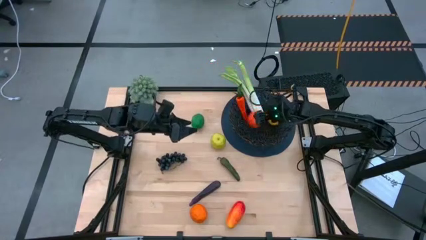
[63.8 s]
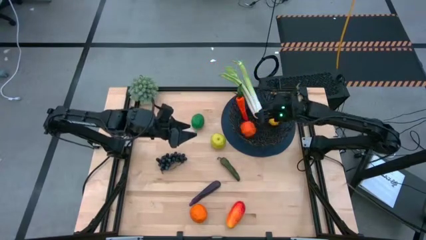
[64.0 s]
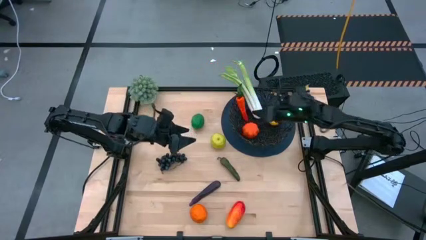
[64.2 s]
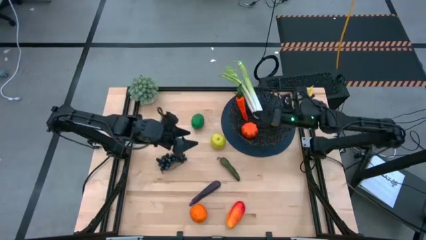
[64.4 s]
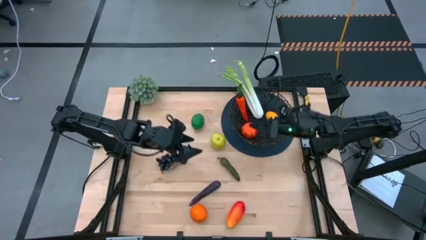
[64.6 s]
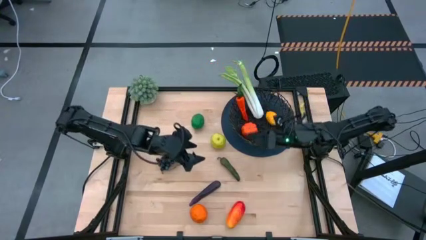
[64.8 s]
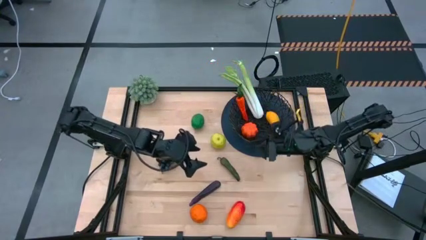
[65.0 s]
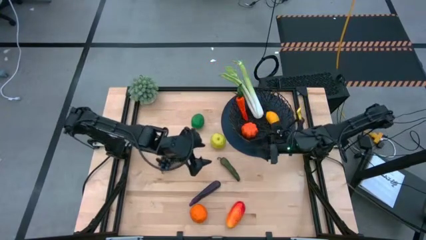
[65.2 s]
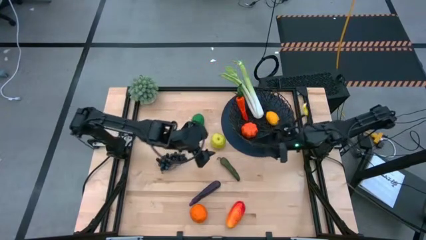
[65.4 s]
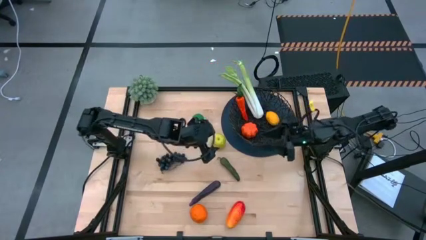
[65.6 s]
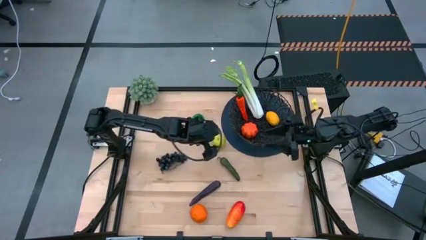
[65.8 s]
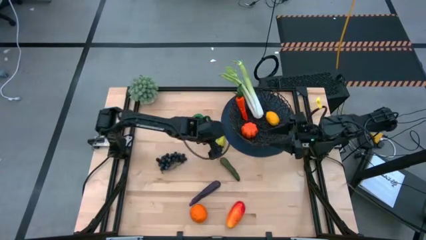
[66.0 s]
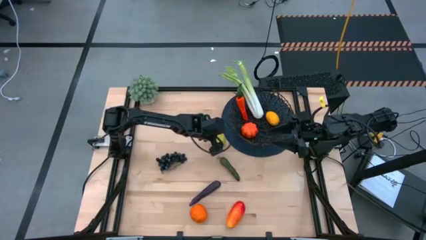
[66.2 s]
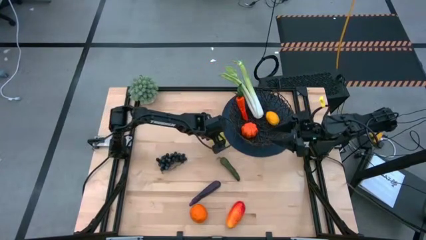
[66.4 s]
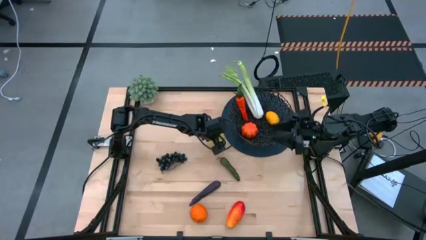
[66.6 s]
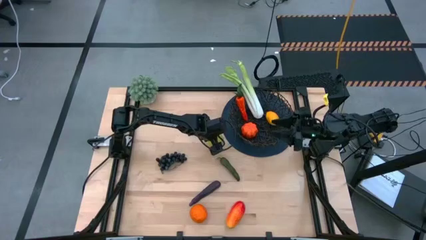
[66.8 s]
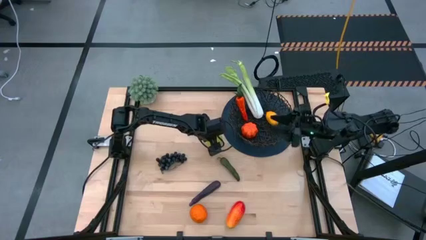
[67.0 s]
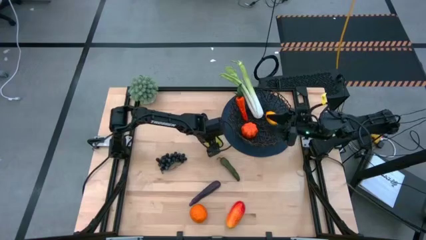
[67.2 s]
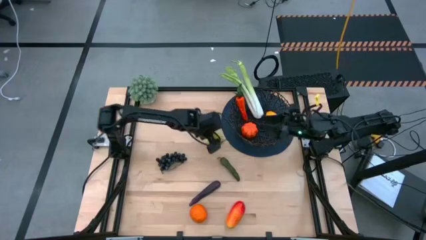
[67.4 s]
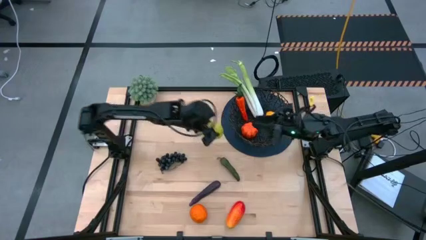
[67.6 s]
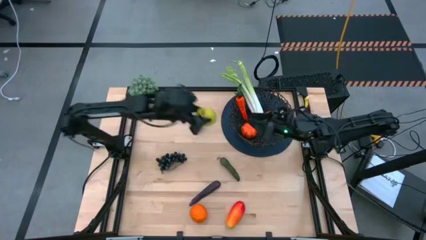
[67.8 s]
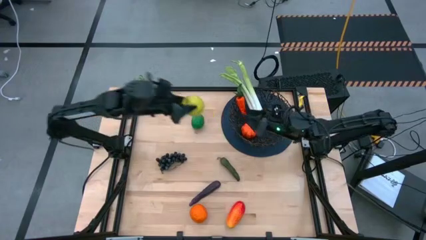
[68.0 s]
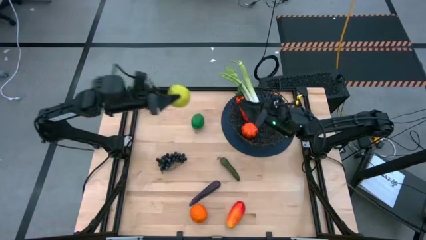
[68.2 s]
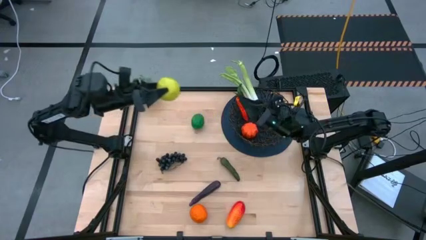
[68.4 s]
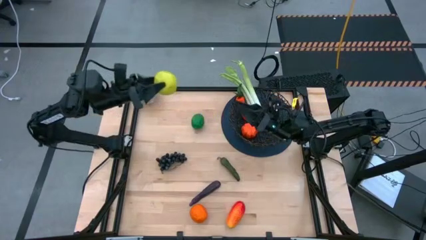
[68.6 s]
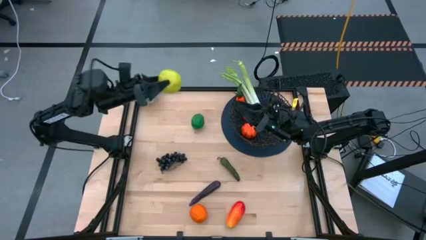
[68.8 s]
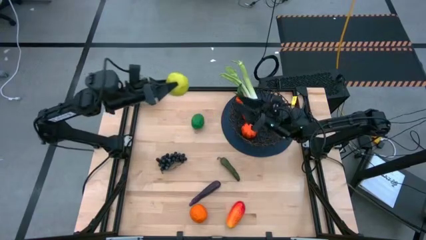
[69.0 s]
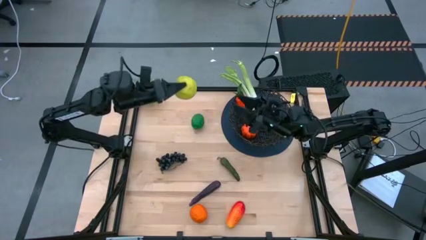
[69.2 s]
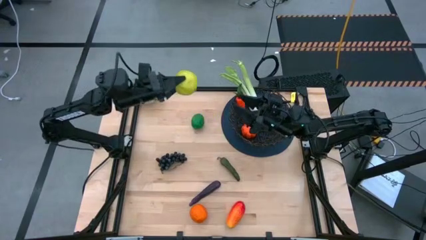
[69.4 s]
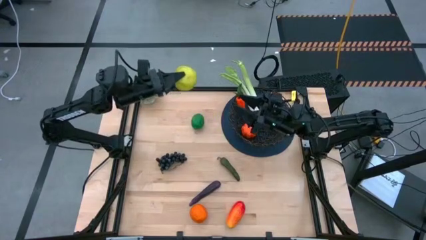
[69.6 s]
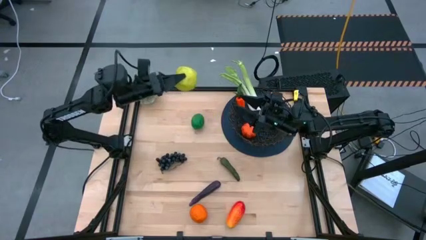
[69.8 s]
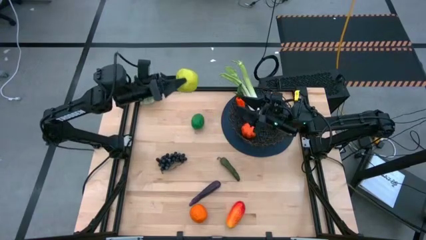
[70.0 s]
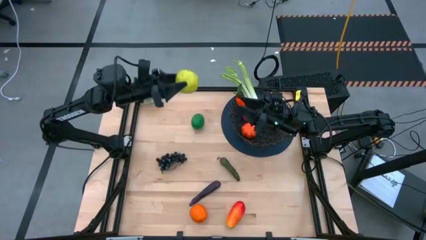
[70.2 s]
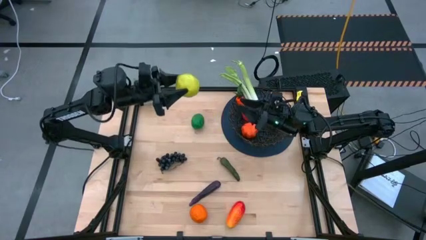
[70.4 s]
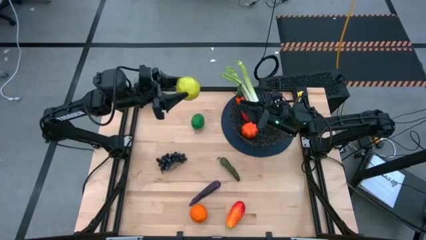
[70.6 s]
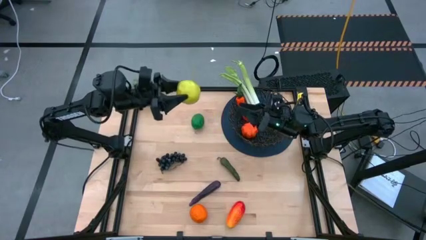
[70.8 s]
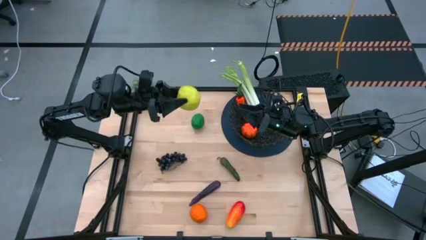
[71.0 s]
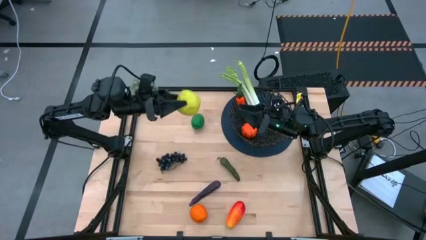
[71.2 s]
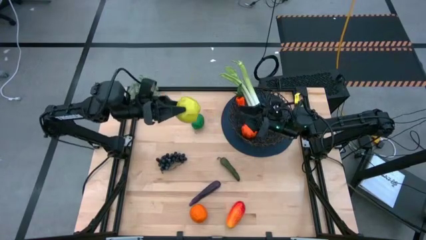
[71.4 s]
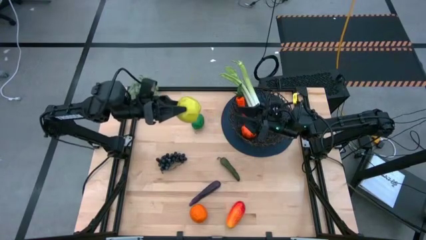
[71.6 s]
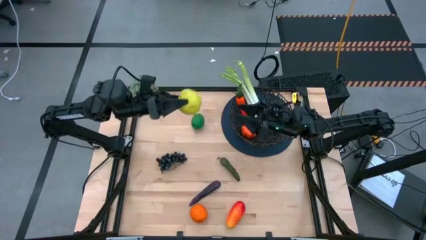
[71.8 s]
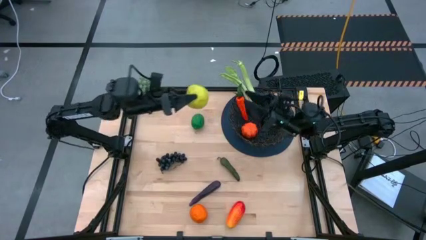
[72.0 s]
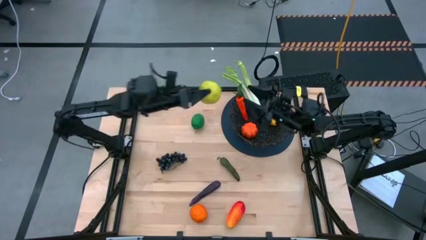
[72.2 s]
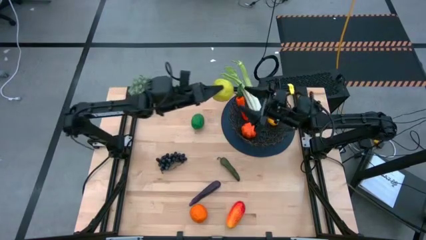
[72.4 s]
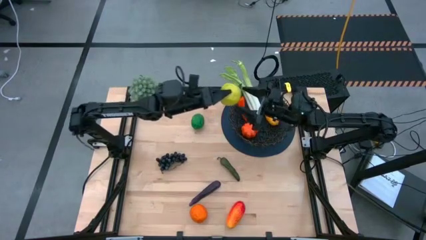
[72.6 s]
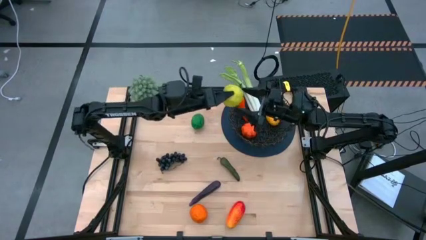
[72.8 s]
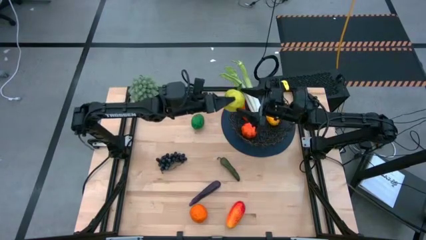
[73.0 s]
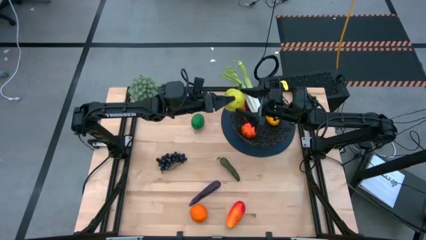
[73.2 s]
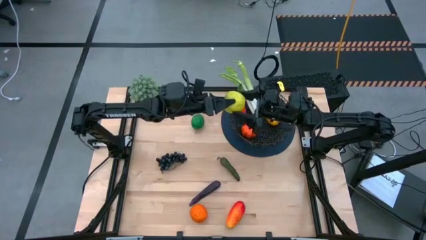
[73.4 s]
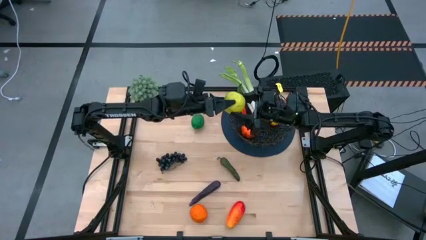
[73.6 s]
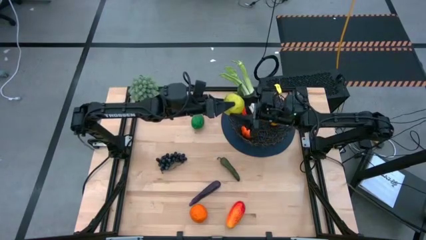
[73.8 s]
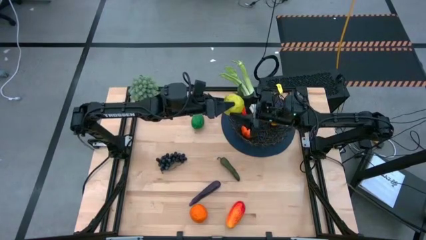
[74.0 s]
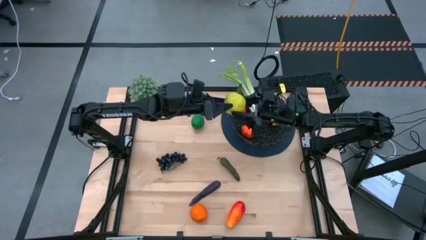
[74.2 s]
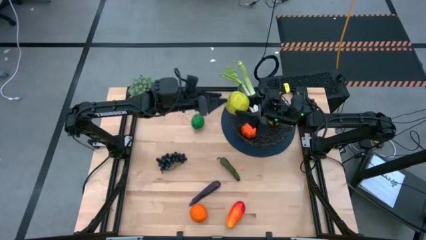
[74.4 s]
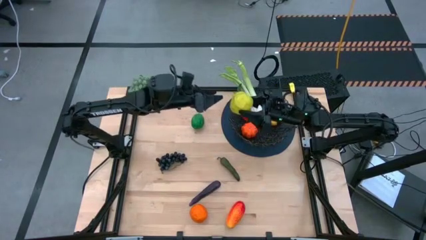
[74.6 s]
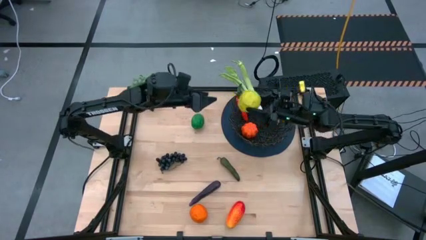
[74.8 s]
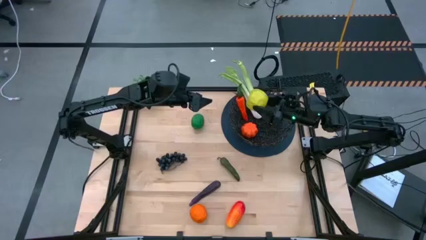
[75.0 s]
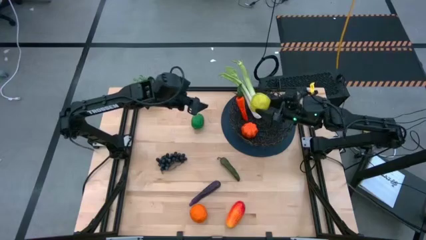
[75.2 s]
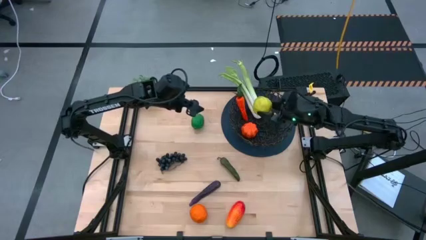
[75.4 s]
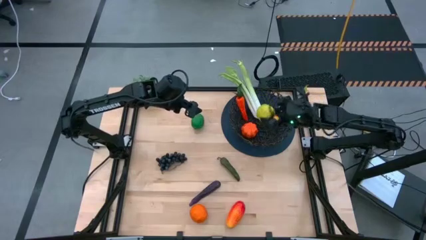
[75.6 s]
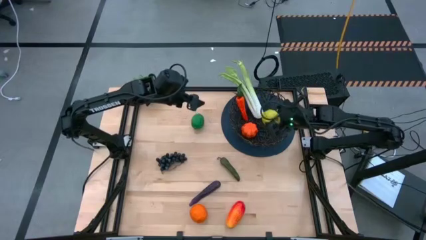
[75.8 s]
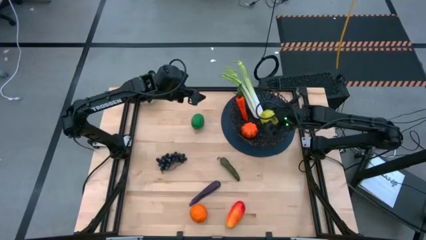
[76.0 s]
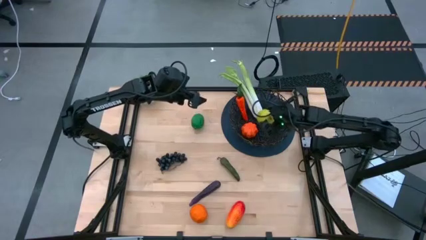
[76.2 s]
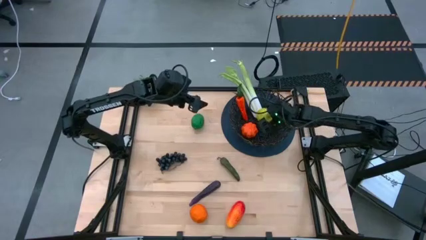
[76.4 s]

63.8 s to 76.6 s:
Task: Build produce basket
Put the red apple into the black woven basket
